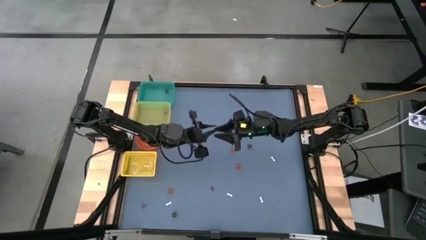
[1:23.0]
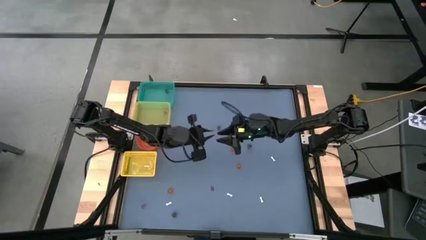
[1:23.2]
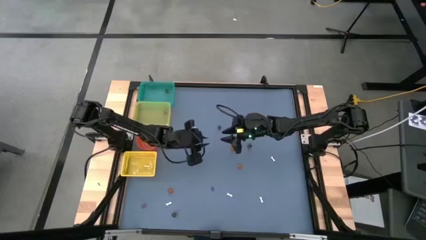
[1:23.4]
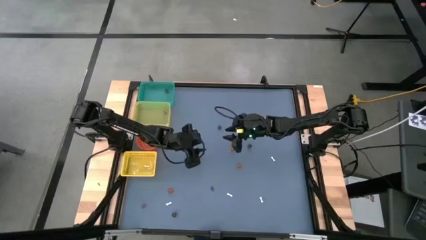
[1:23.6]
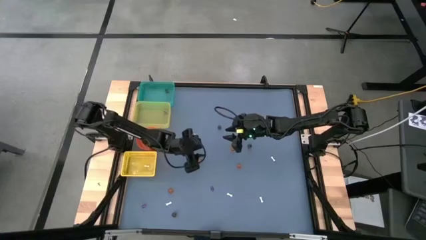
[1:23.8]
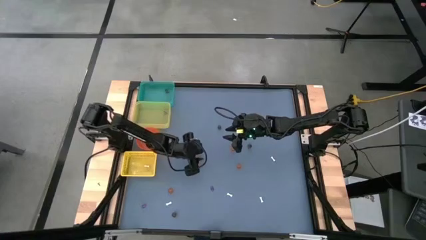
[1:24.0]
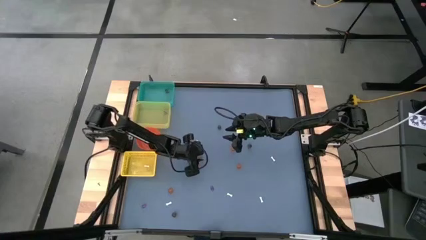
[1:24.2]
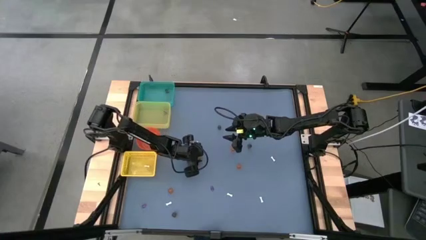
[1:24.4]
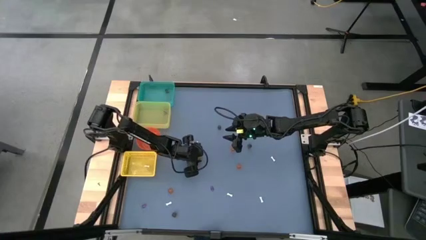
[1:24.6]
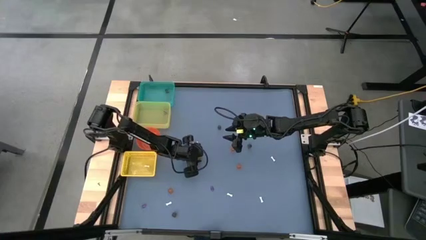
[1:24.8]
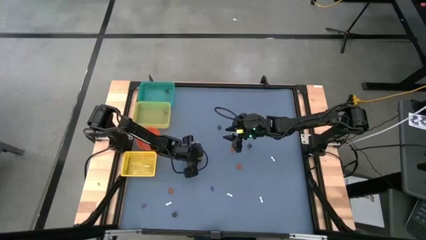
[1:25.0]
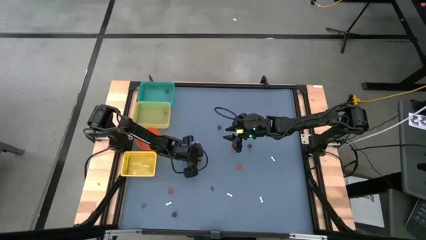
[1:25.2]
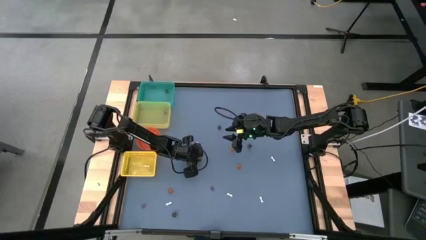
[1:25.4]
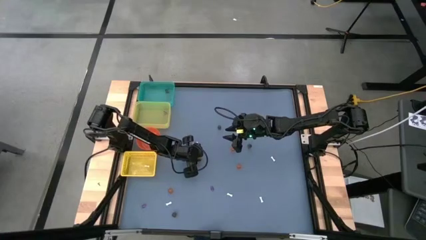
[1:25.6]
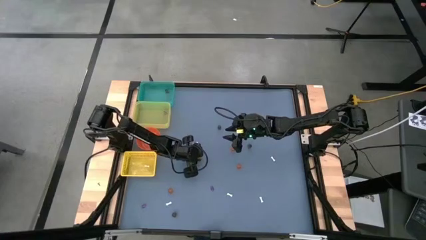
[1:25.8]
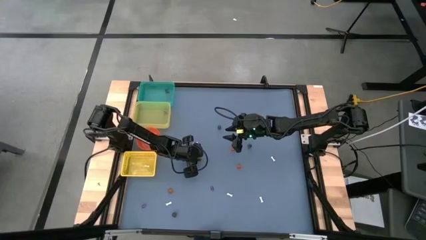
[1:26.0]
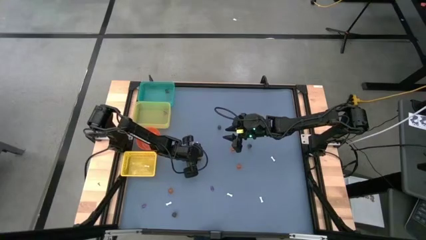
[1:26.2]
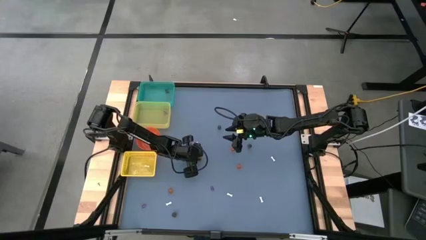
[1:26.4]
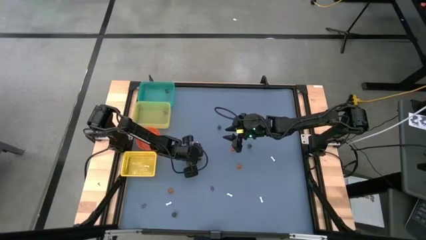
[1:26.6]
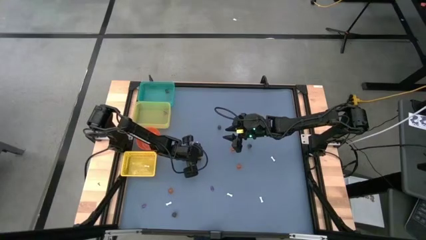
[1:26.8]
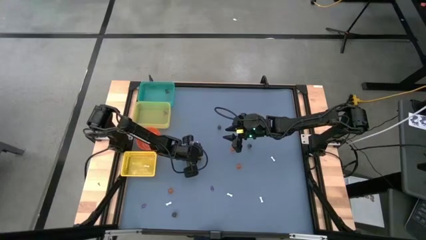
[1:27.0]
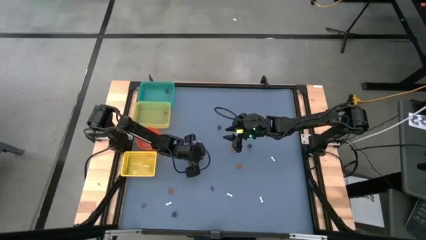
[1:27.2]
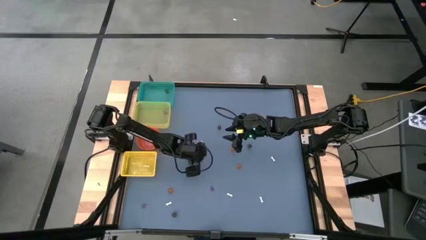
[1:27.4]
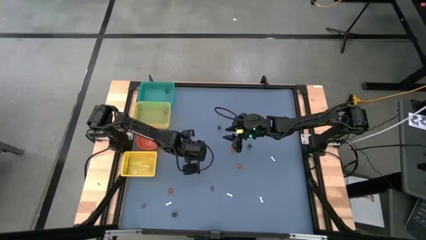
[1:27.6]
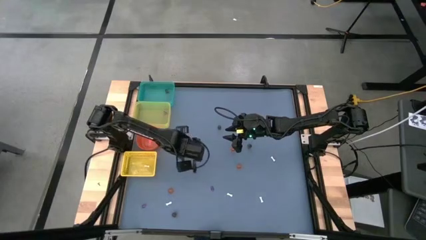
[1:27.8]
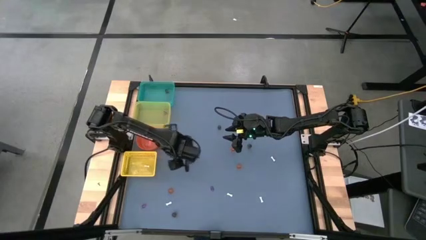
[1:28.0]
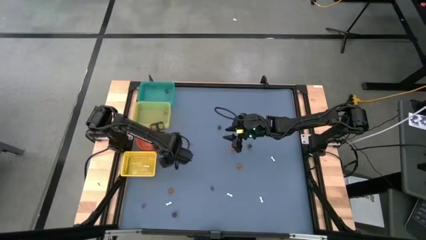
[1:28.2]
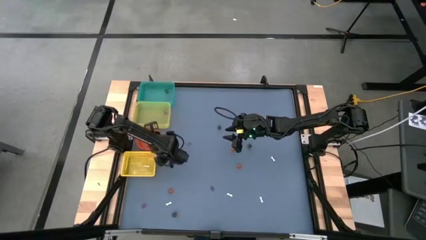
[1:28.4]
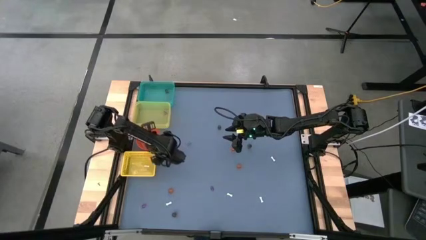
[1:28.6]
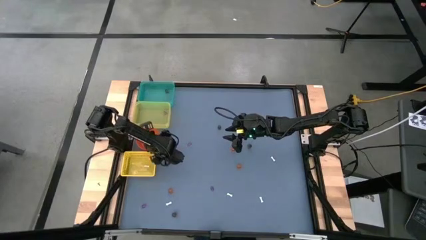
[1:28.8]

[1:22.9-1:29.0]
Task: Sort Halloween decoration
Put the top left orange pumpkin toy into the orange bin

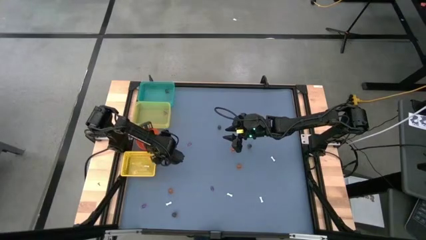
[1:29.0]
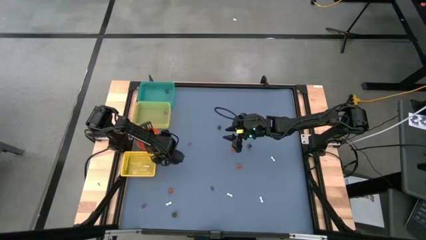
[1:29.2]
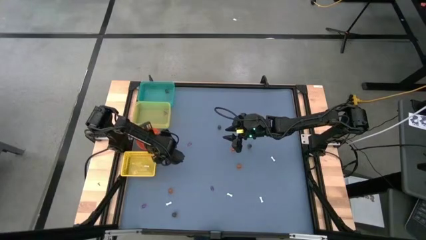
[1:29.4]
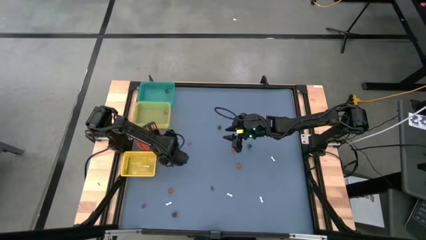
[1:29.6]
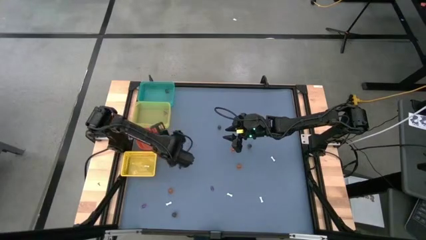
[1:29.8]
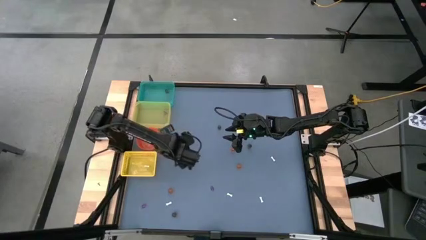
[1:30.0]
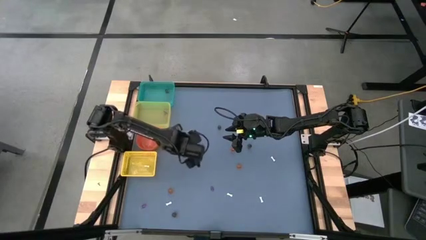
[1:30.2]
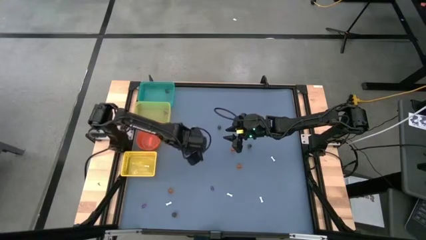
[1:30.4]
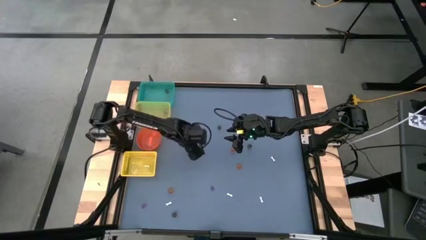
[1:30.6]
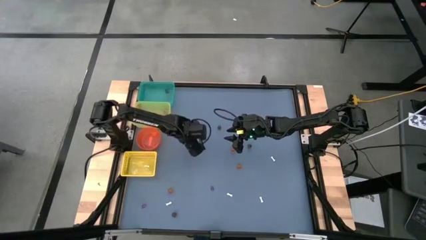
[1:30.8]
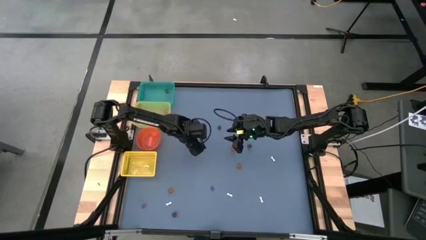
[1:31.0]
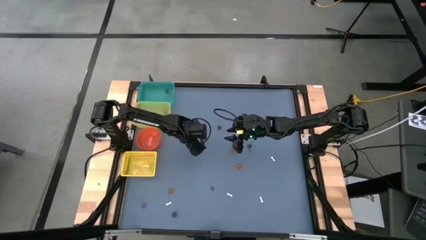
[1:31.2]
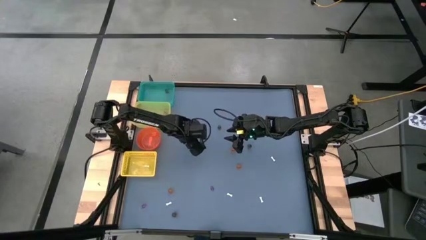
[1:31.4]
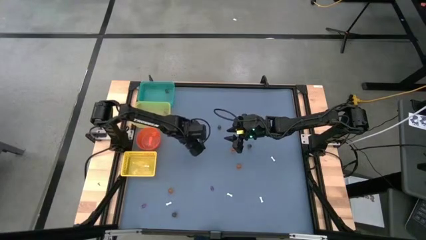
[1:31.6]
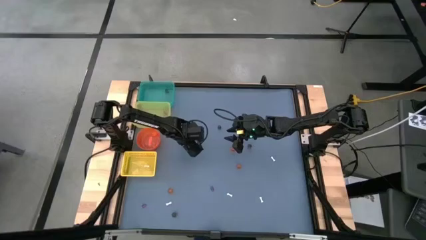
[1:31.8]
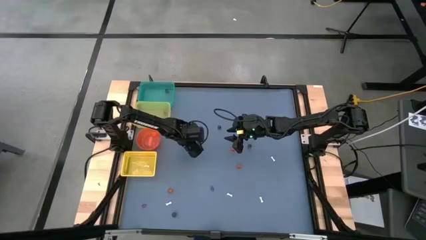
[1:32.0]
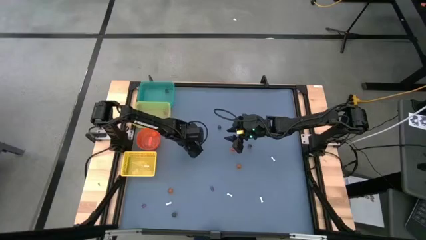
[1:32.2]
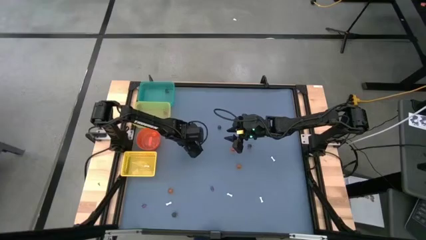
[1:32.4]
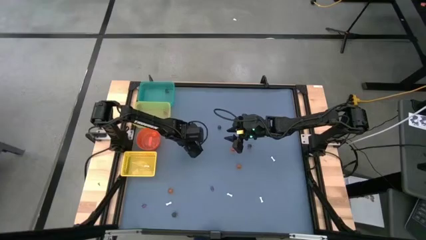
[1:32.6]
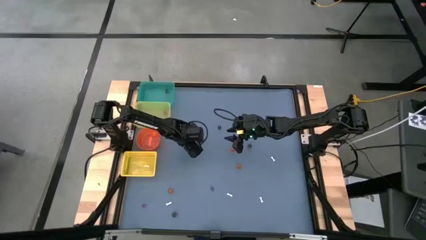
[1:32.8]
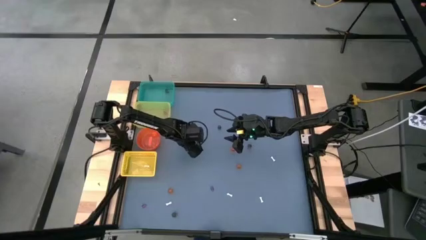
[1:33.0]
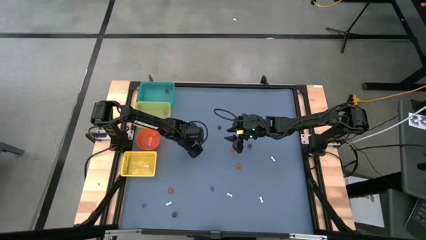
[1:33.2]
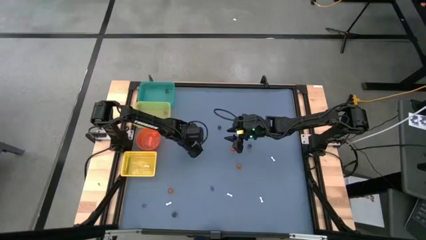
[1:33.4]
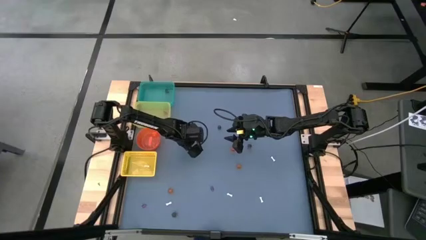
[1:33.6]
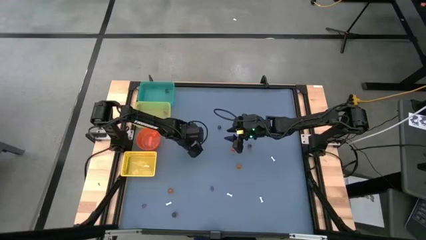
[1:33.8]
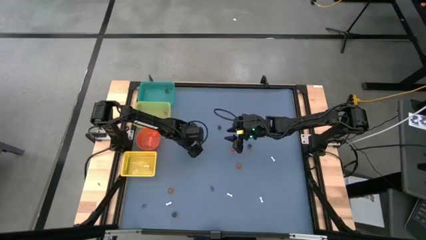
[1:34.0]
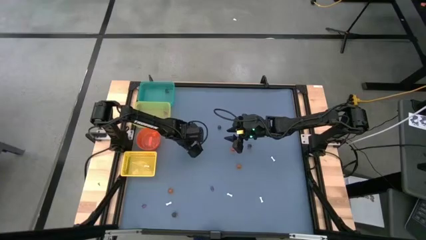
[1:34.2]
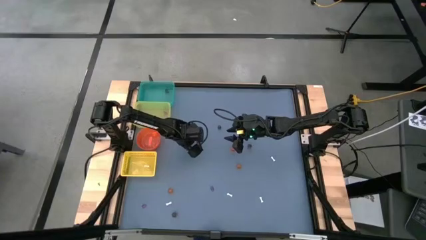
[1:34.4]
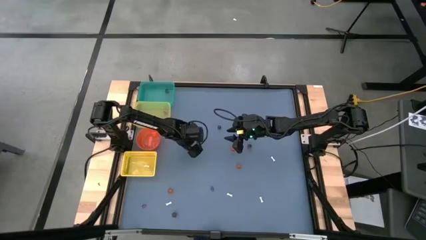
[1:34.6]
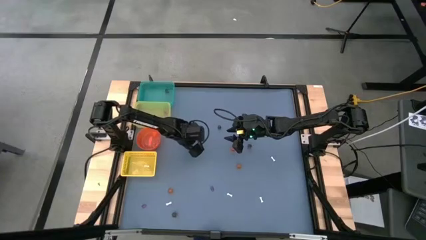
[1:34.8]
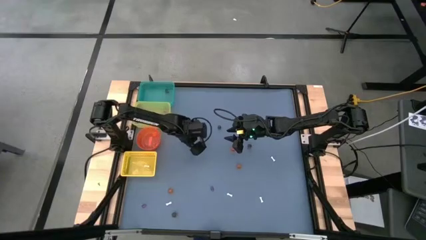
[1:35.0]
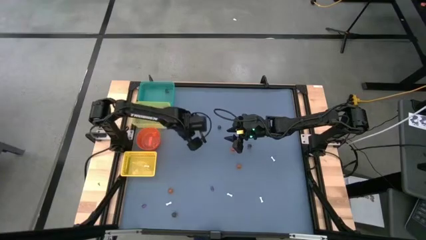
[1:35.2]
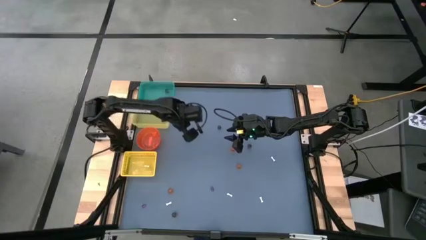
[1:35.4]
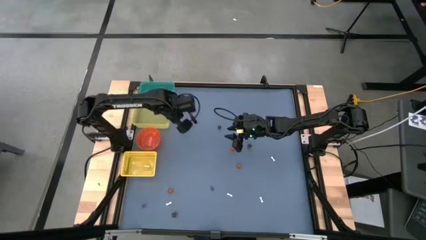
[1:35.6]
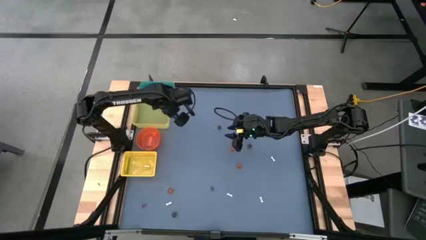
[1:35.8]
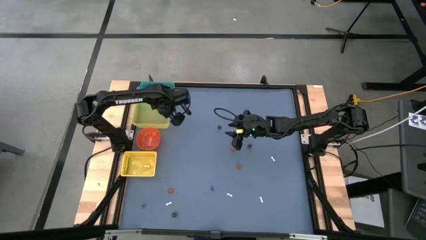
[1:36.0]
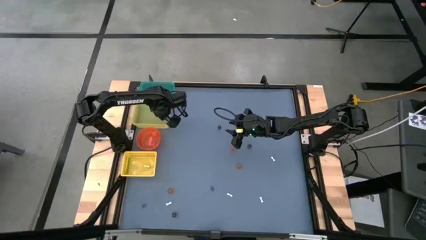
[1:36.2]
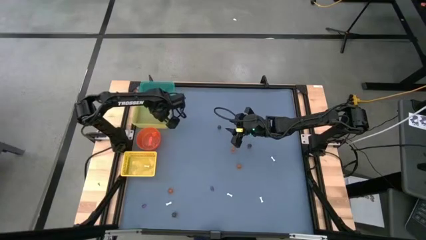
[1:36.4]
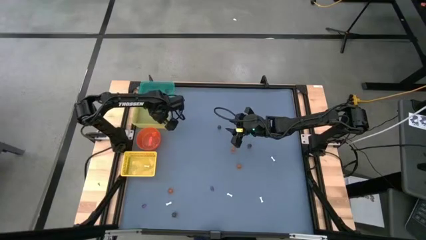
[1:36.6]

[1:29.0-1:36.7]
Put the top left purple witch hat toy into the yellow bin

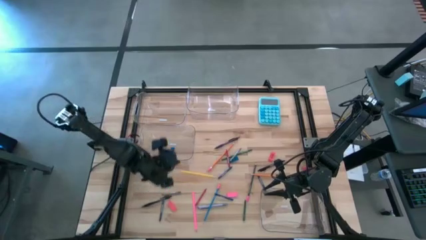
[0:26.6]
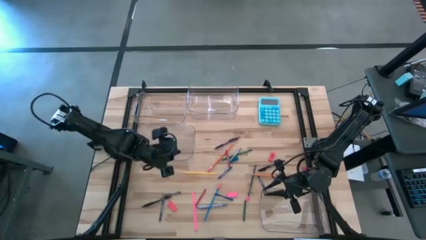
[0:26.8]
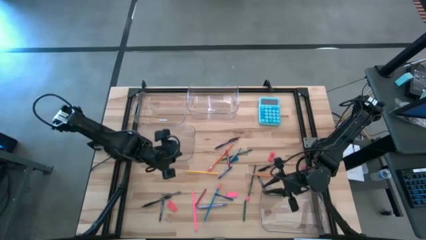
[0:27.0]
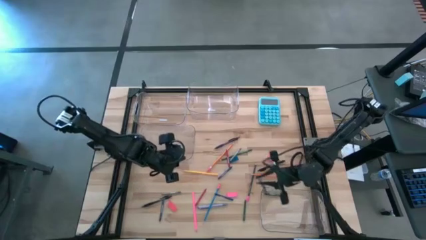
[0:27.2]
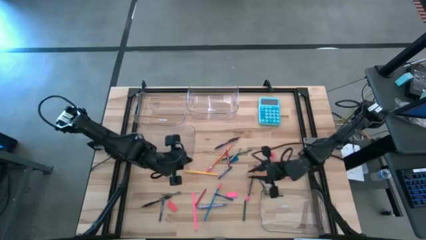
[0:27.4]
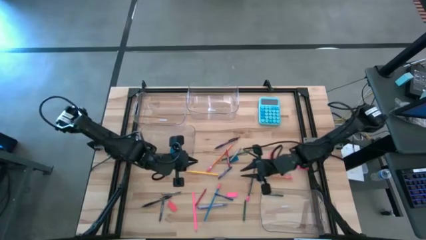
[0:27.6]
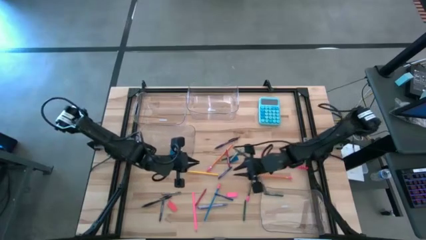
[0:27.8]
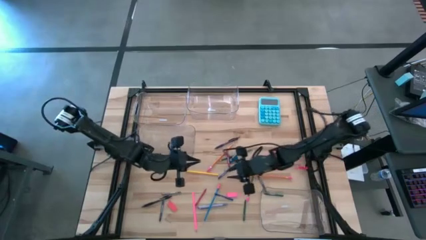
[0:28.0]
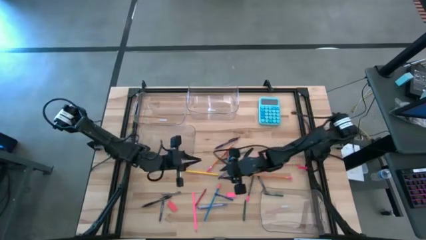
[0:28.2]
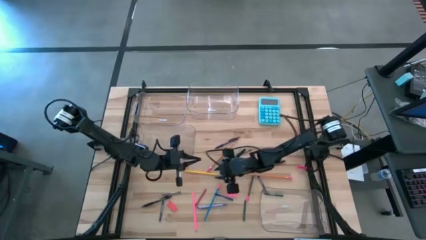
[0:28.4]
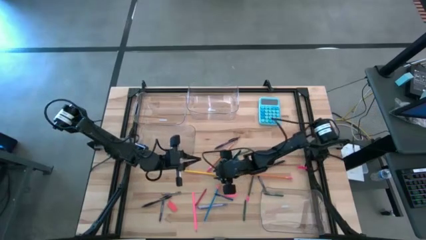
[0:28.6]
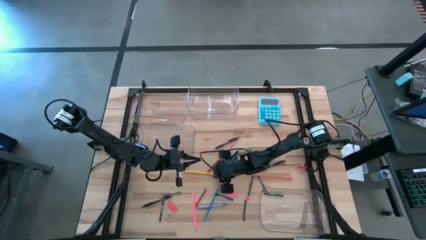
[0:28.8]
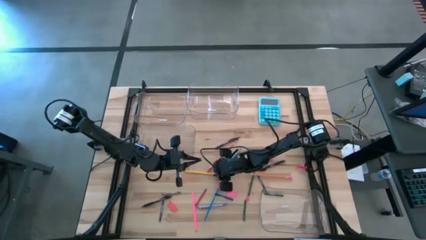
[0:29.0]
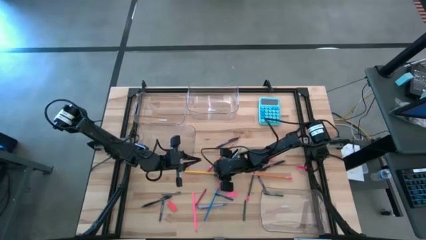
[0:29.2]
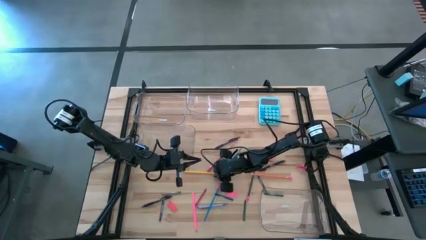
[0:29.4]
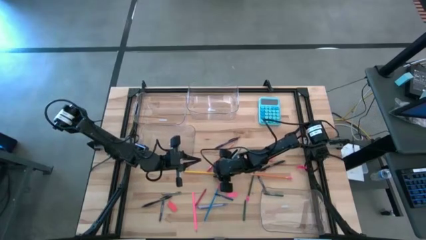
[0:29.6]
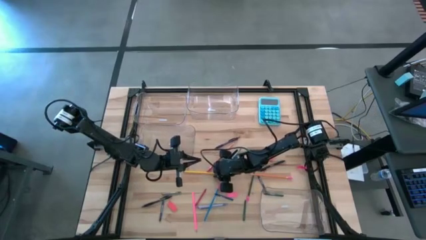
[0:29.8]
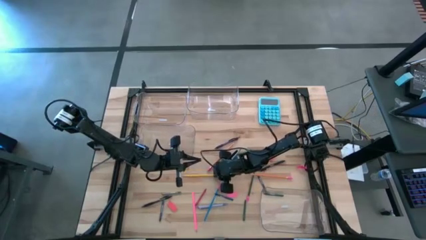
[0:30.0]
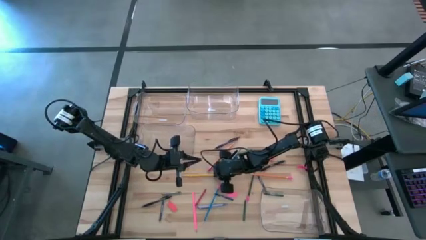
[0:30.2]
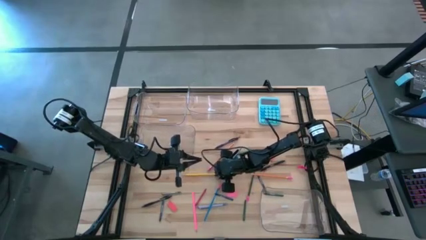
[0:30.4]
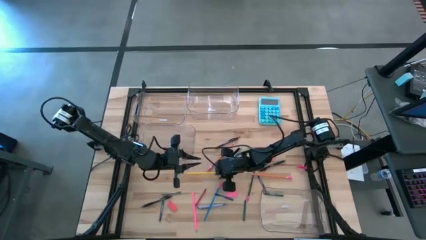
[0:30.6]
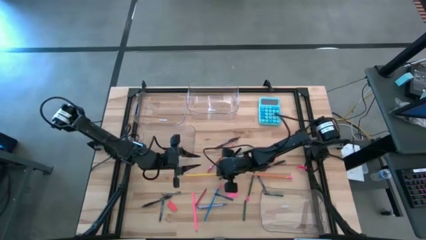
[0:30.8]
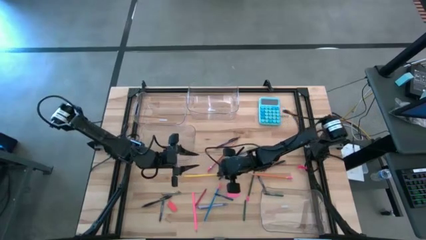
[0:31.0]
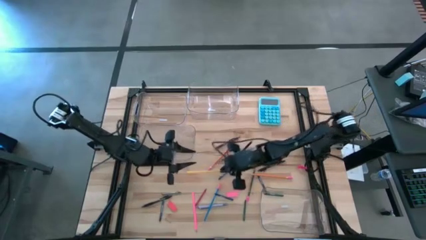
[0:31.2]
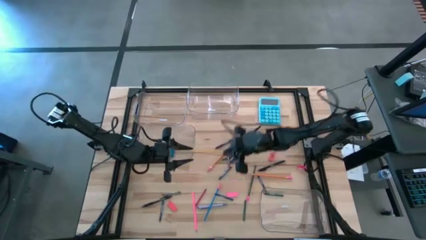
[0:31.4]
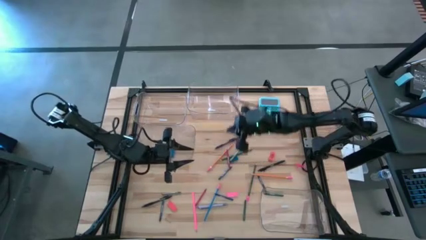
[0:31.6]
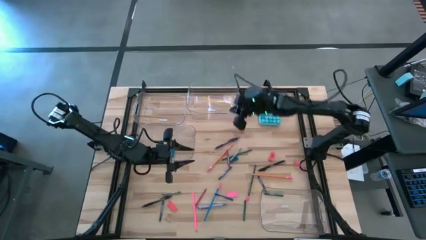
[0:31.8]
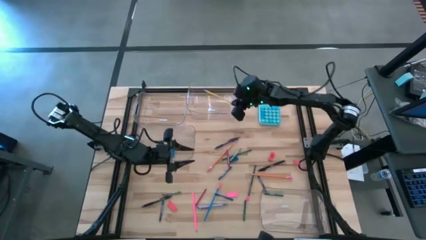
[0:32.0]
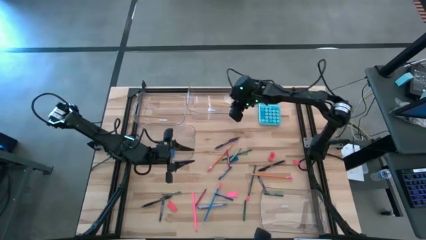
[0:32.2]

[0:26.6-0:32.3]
Task: Sort crayons/erasers/pens/pencils in bins
Put the yellow pencil into the top right transparent bin
